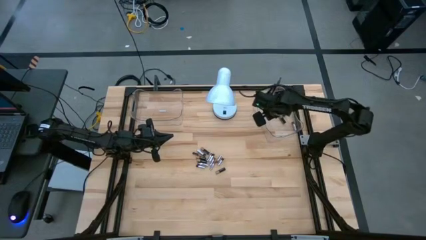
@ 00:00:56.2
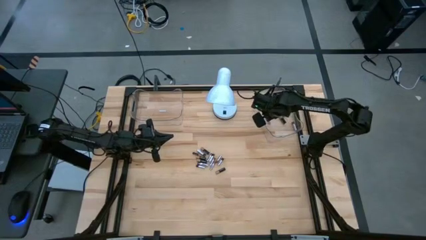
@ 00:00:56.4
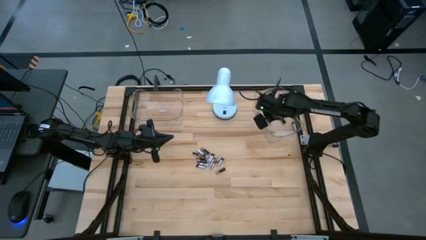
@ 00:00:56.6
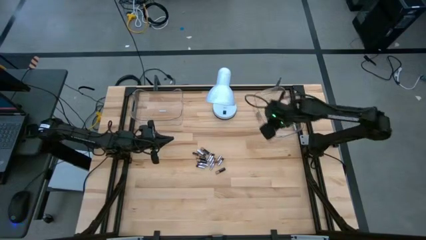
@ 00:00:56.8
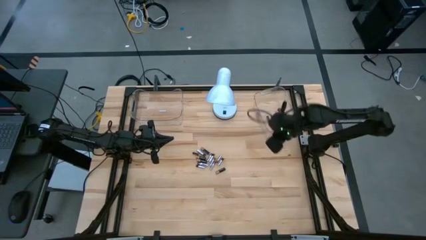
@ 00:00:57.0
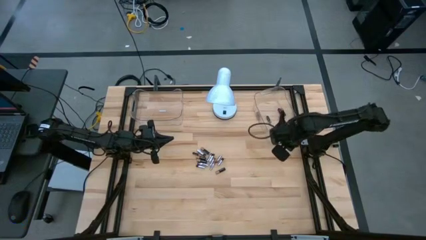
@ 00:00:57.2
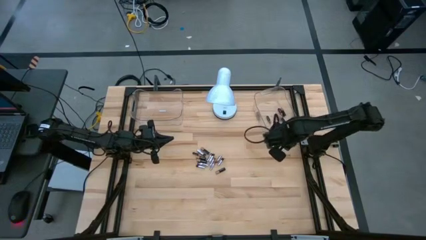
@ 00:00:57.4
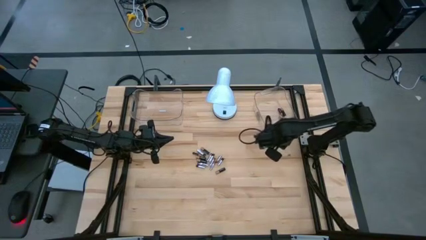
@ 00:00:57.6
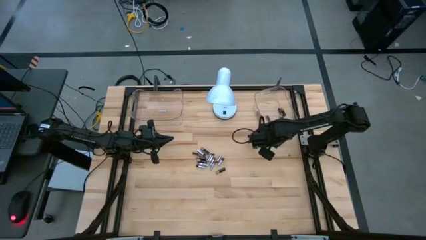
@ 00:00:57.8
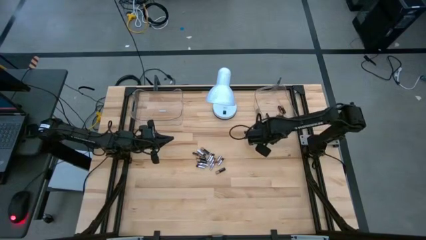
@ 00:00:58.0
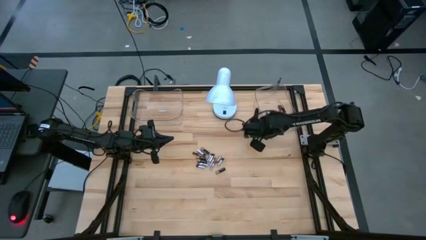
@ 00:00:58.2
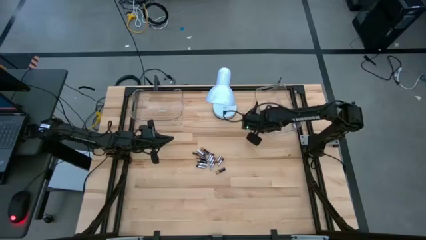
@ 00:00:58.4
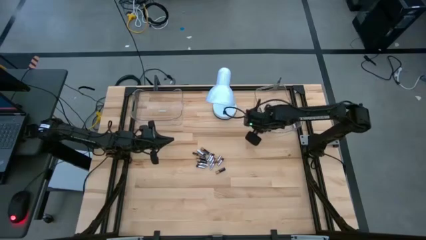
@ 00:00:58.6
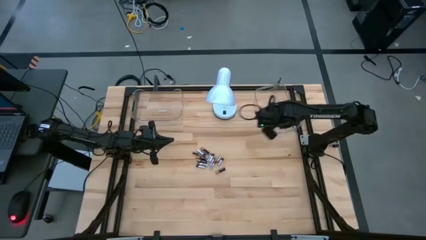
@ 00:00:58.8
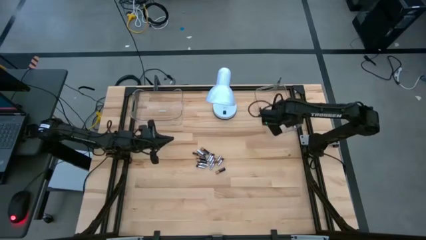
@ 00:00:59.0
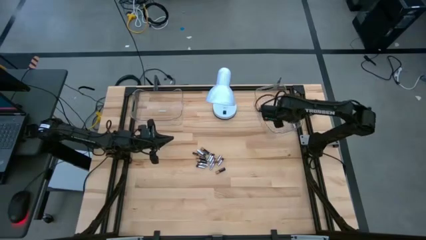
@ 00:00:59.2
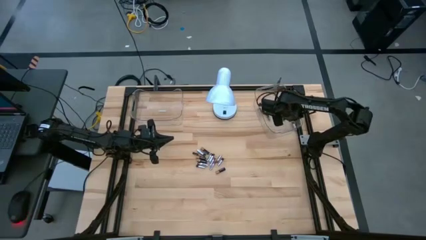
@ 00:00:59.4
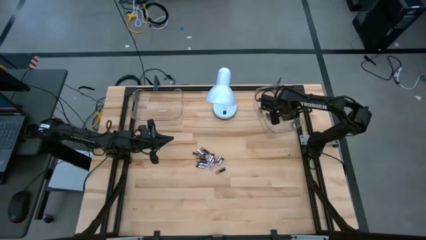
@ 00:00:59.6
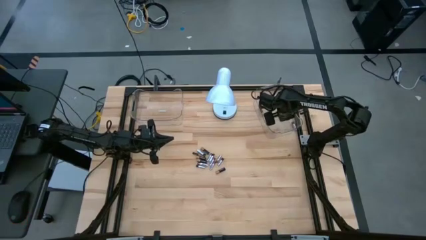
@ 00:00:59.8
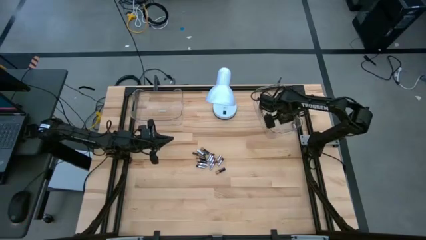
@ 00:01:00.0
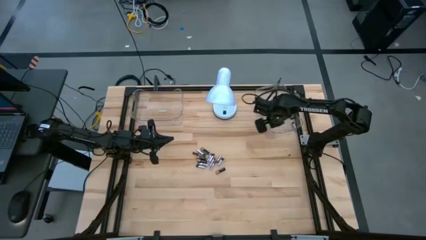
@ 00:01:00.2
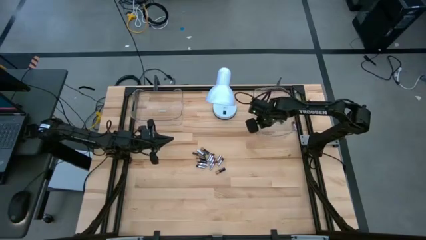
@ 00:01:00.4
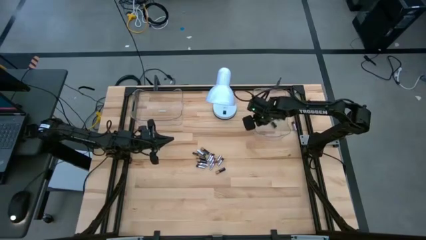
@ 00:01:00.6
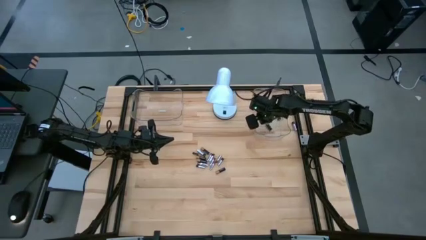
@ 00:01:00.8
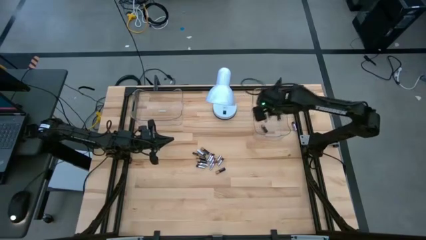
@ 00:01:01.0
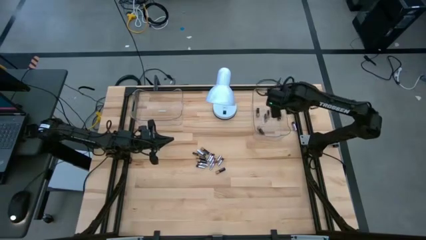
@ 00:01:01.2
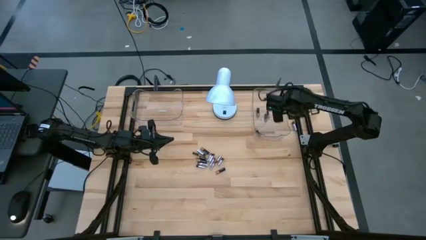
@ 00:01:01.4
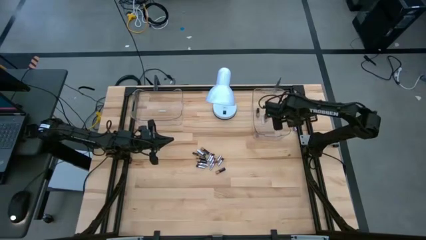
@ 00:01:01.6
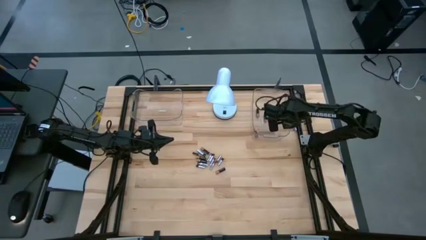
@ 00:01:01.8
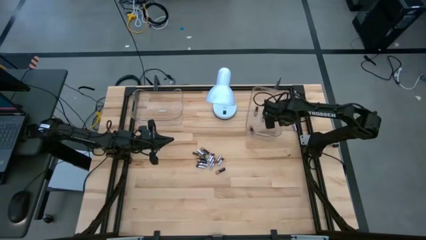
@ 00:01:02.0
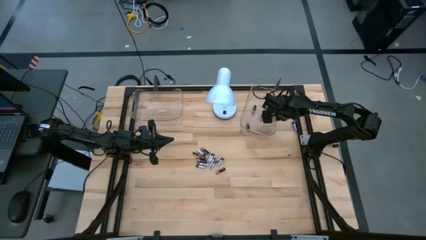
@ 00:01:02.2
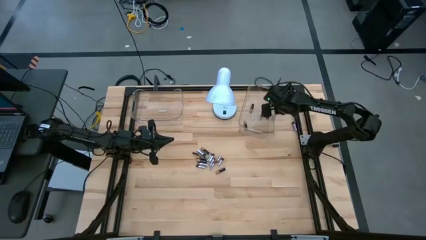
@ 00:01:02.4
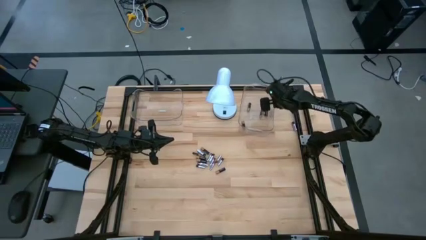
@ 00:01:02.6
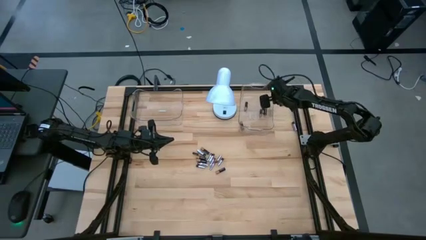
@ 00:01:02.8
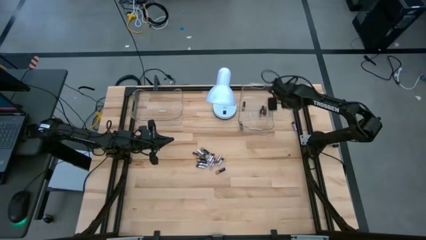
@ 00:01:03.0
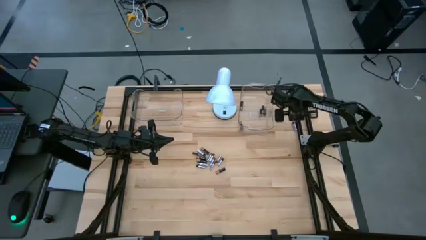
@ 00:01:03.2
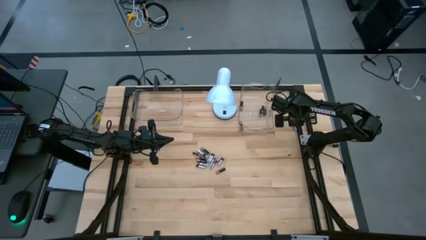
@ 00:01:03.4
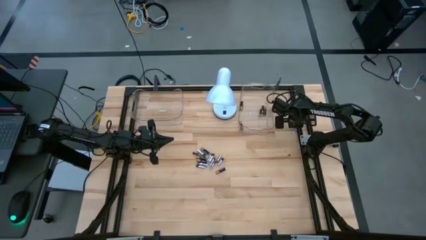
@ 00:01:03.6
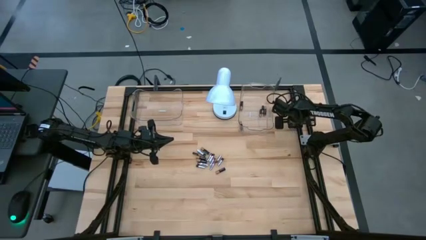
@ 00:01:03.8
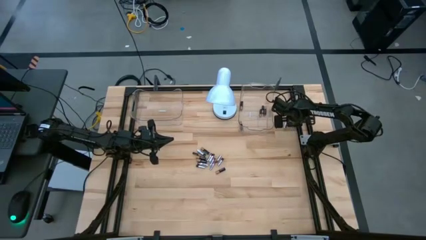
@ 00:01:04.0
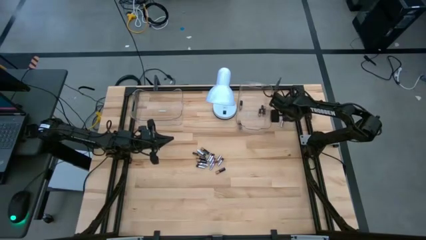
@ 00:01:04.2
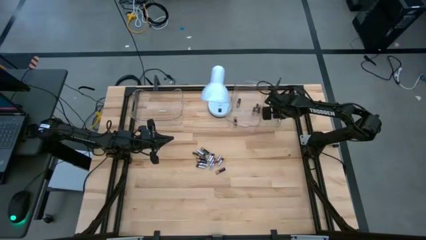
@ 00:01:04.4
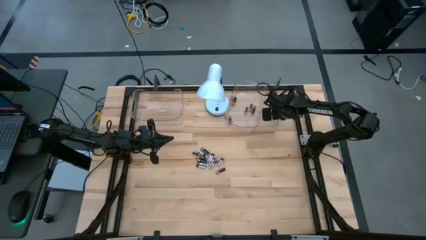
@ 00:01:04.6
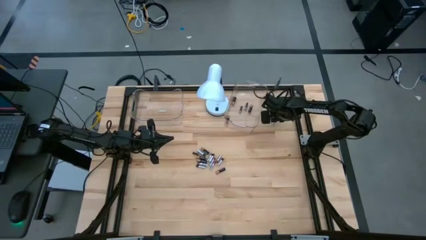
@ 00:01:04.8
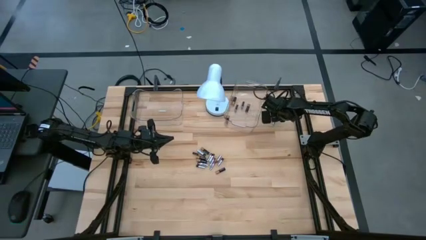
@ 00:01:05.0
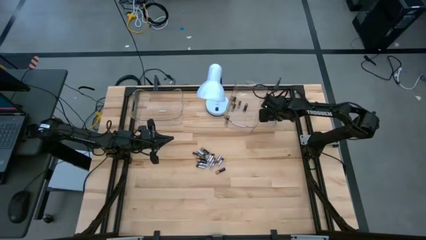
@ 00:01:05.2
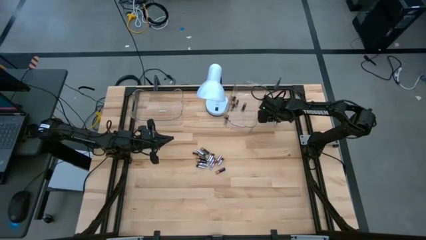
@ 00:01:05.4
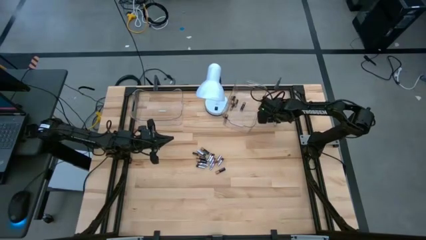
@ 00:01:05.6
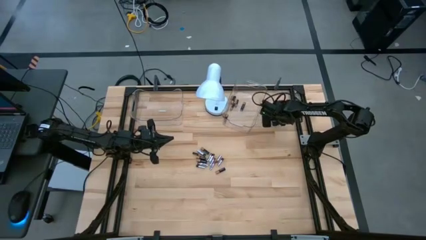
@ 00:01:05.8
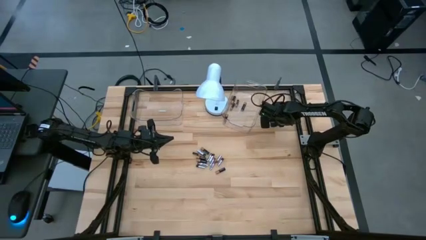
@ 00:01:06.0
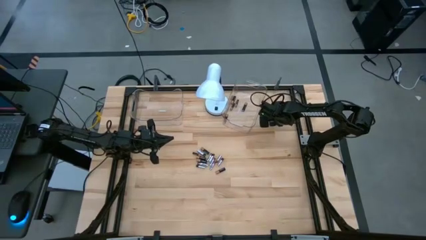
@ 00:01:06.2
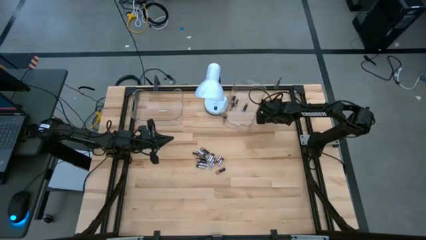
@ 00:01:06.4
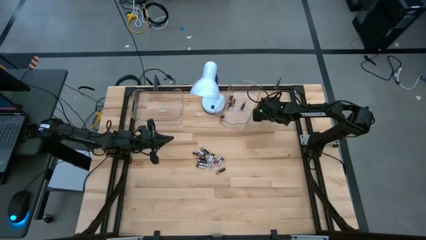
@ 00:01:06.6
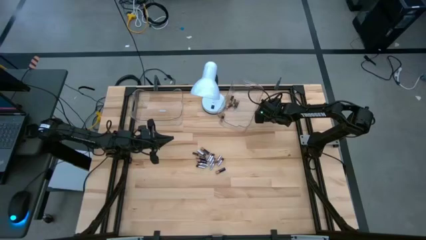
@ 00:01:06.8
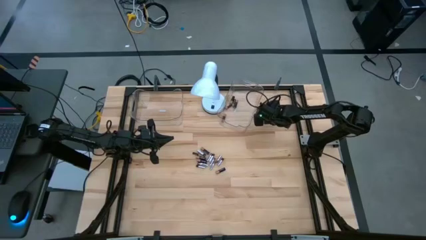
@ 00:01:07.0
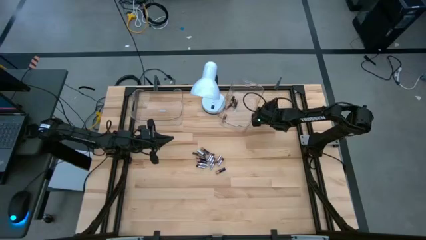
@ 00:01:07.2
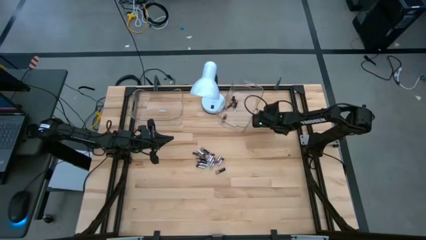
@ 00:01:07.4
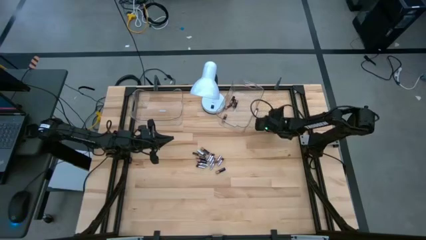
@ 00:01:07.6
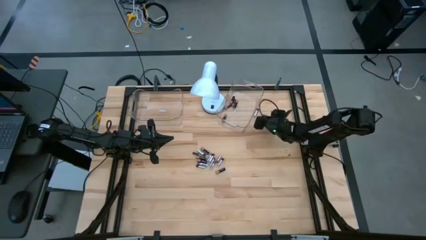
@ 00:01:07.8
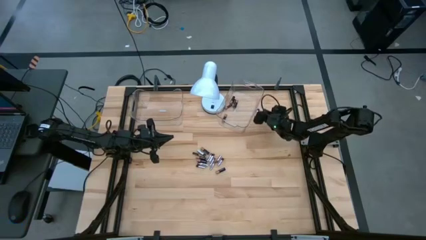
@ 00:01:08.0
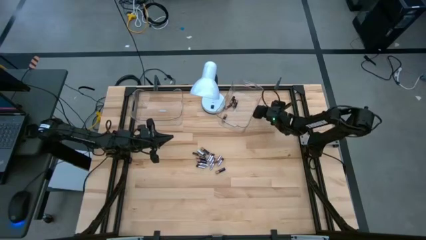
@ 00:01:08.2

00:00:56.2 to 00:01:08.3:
Task: Sort batteries
Put the black battery in the transparent bin
